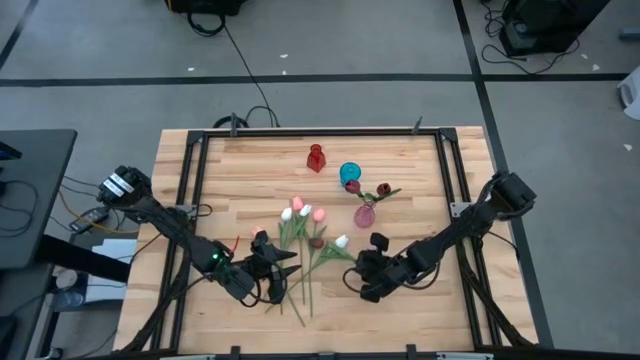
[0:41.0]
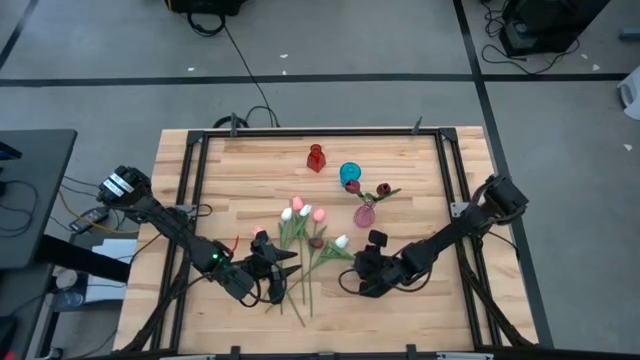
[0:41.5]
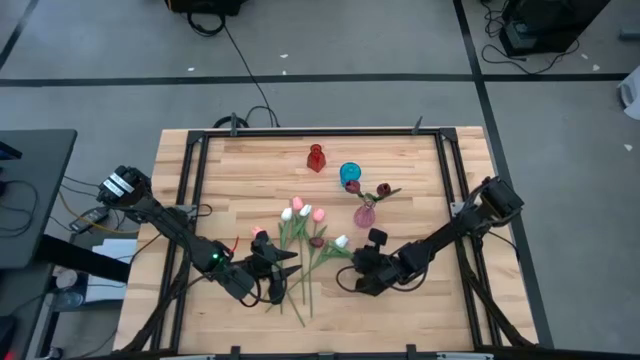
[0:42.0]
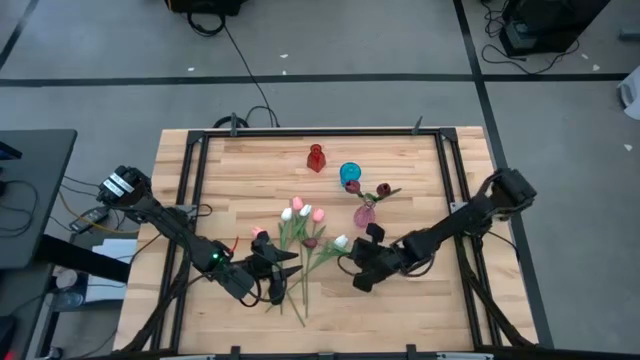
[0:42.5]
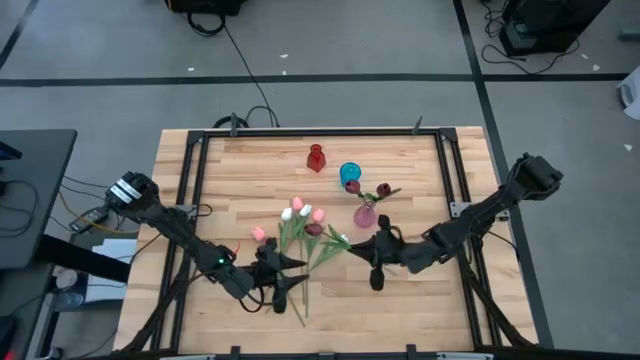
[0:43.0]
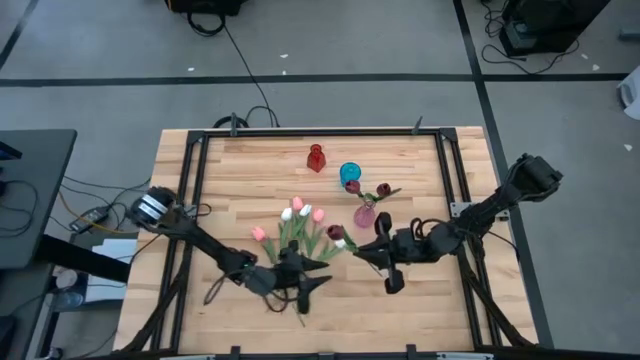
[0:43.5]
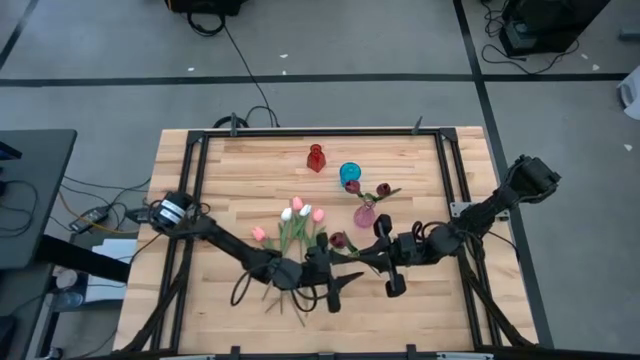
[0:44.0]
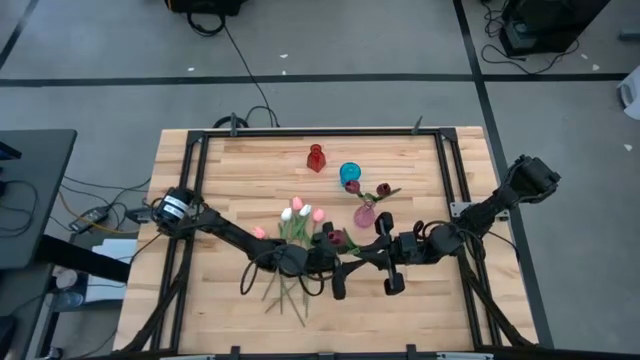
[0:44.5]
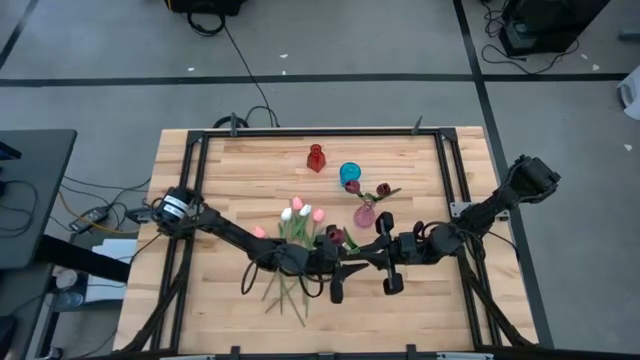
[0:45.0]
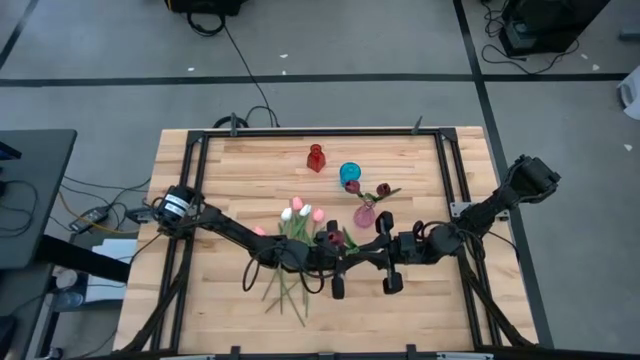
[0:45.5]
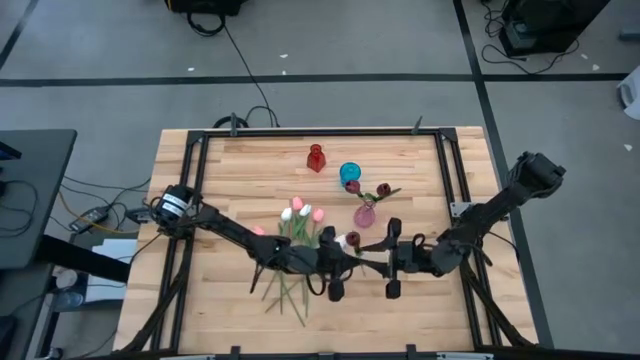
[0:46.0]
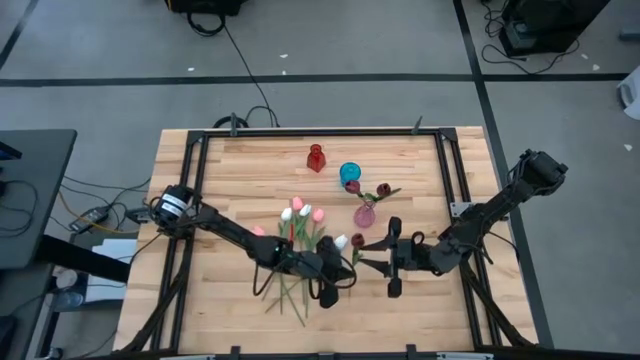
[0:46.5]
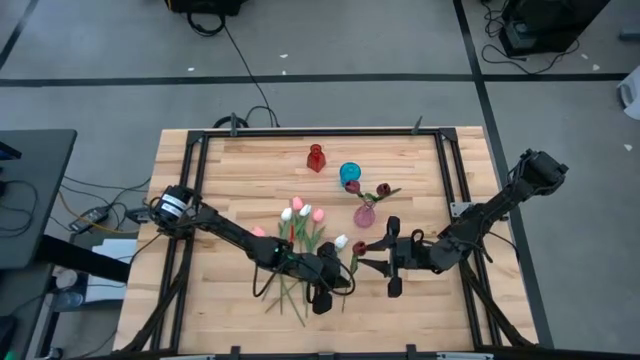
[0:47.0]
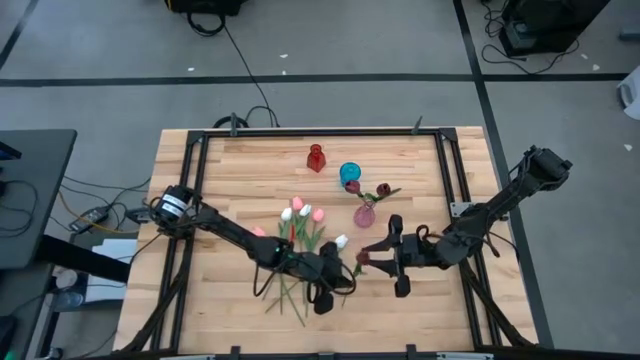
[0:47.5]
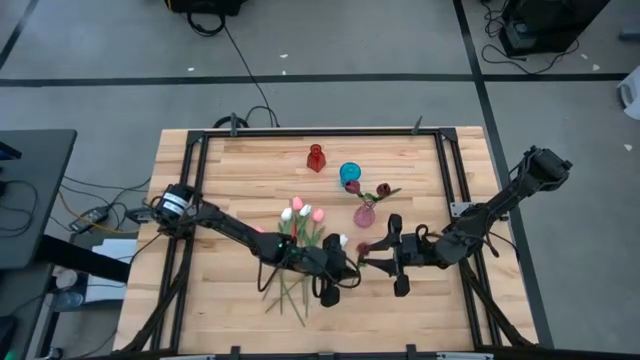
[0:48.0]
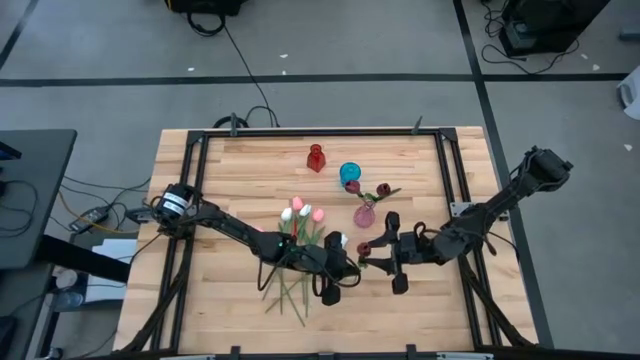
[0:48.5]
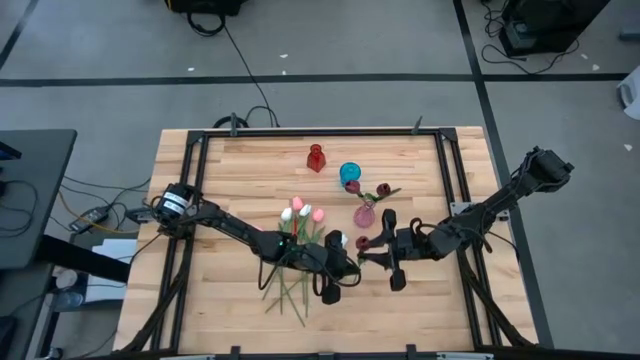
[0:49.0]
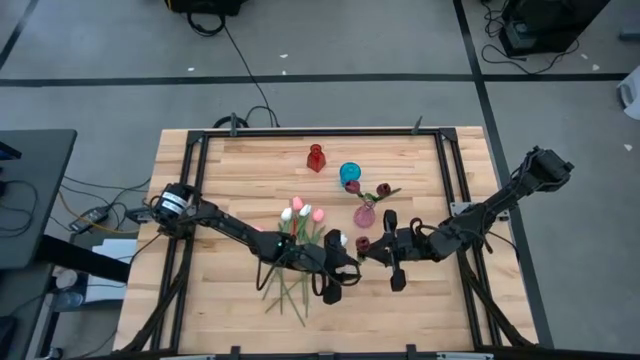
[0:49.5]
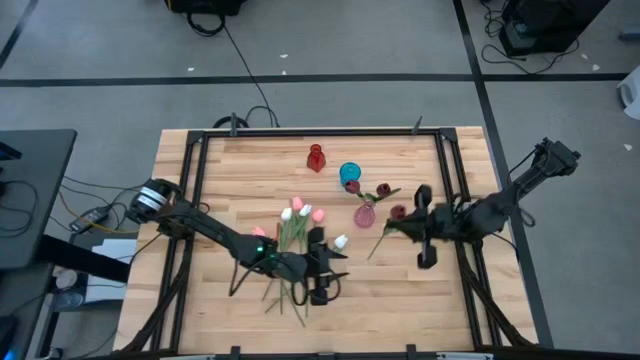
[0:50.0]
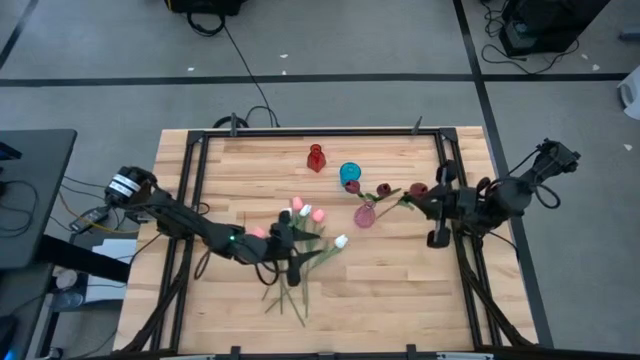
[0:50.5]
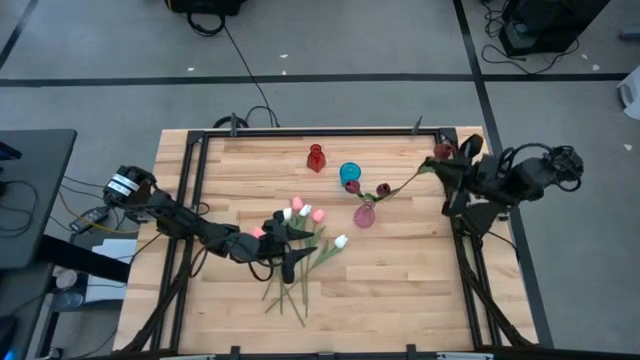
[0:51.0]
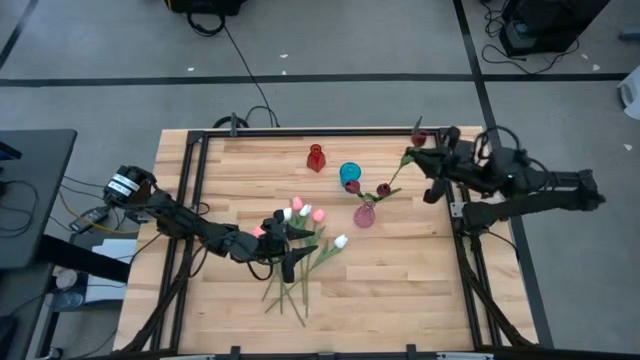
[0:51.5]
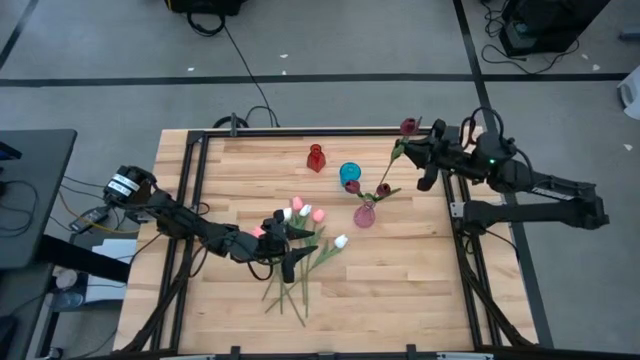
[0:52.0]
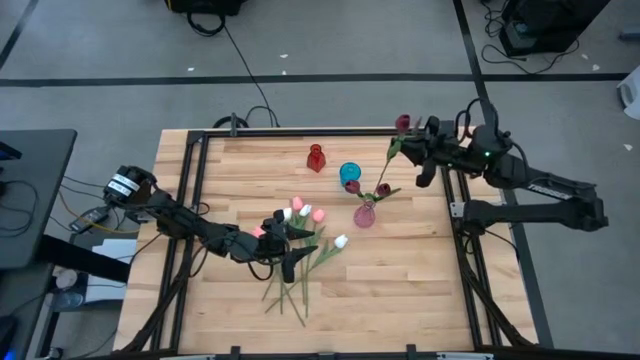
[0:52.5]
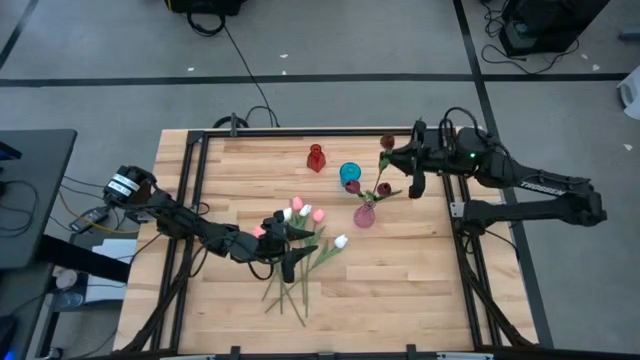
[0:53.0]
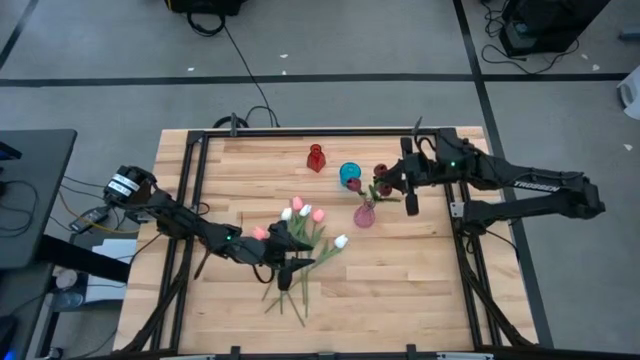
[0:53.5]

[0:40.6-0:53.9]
Task: Sort flowers into vase by color
Put the red tulip into the pink vase

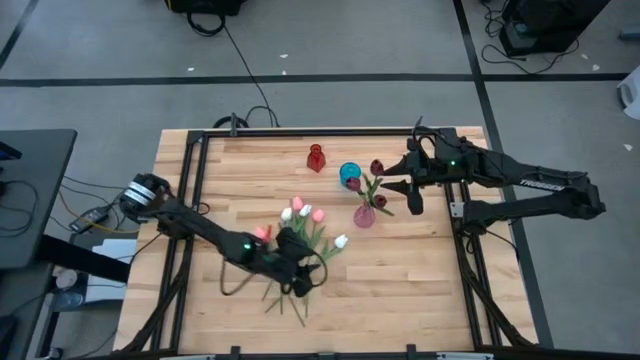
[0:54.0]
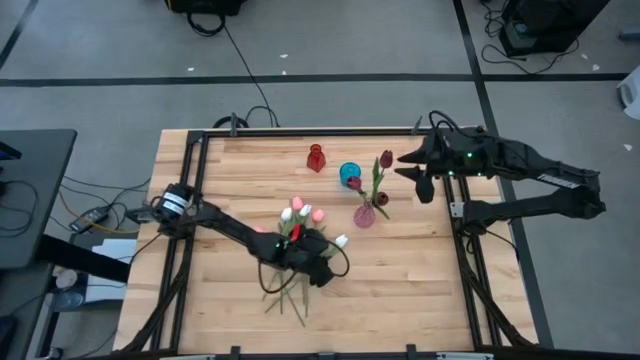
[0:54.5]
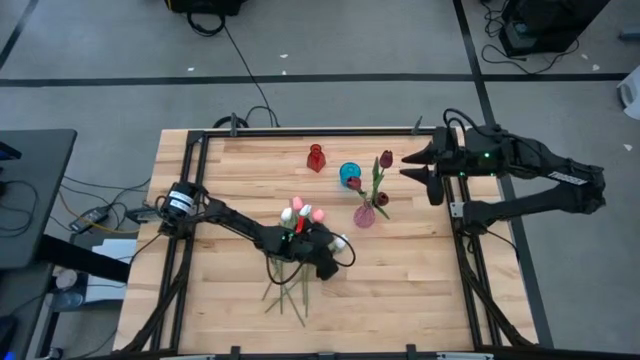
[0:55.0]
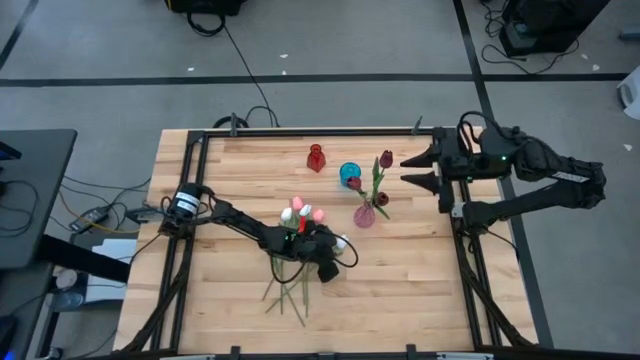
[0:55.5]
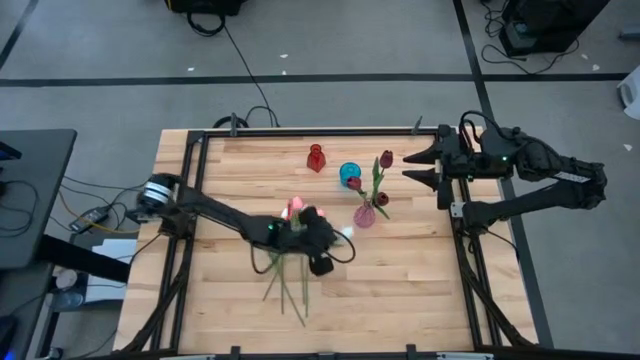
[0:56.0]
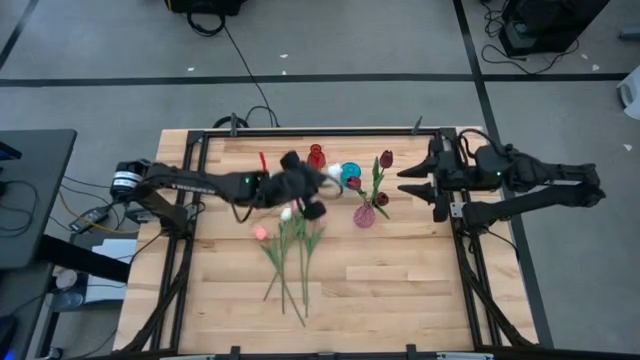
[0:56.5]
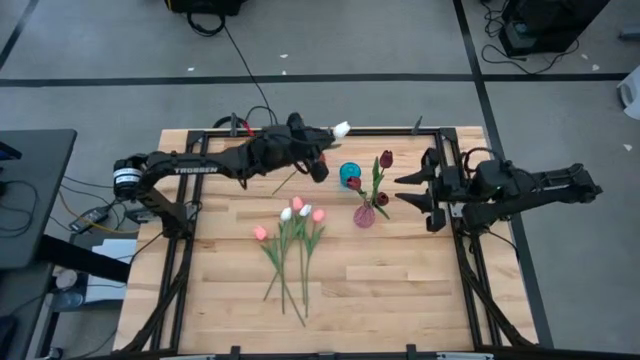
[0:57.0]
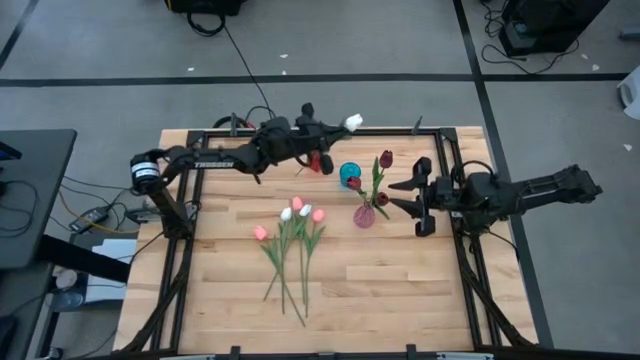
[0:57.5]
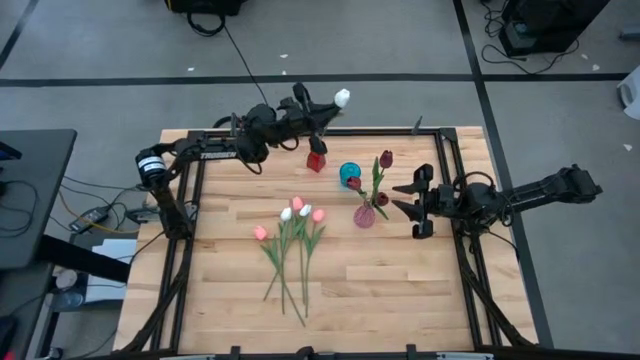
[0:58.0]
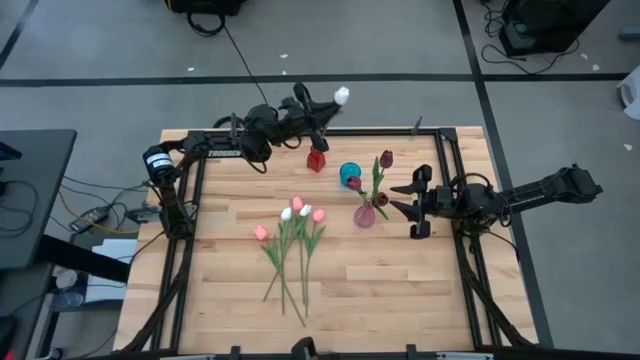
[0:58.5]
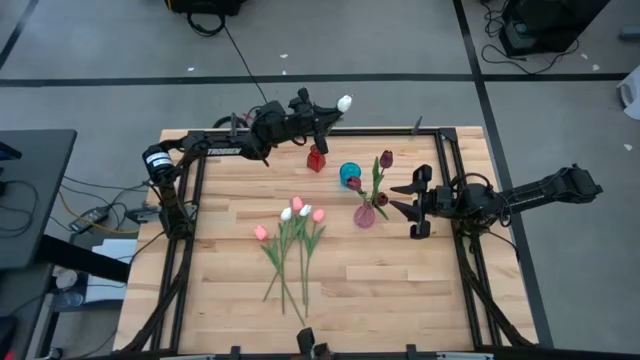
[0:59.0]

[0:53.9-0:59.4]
Put the right white tulip into the red vase

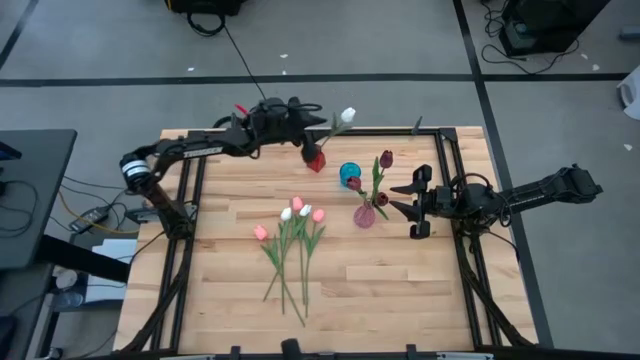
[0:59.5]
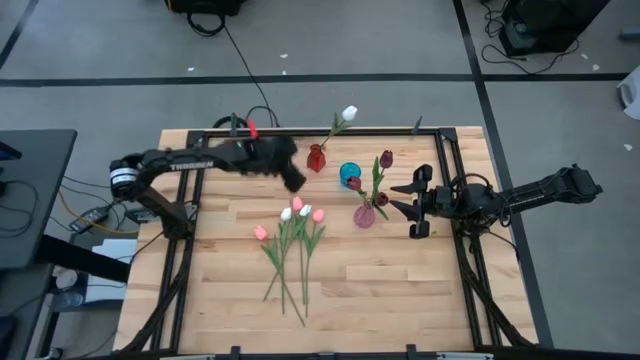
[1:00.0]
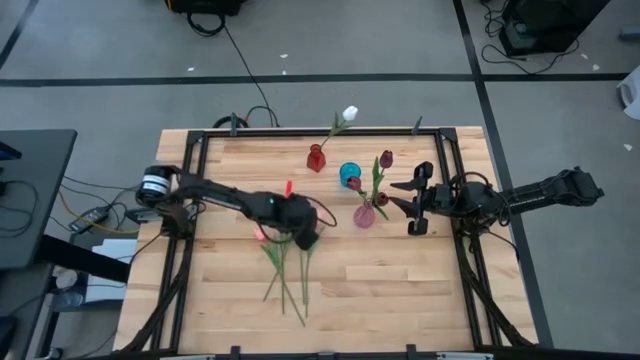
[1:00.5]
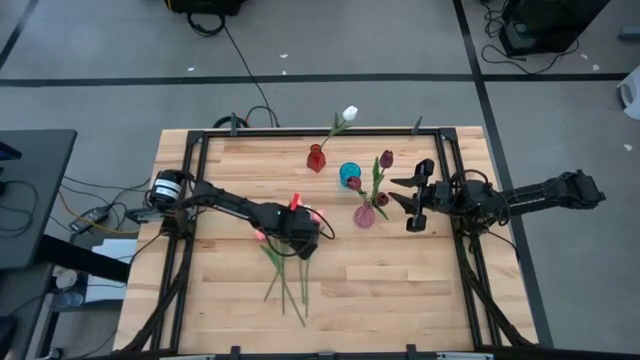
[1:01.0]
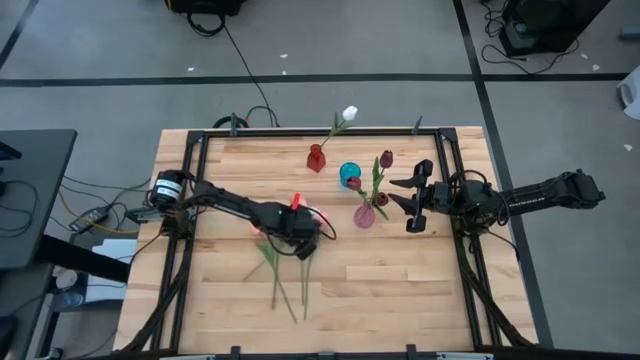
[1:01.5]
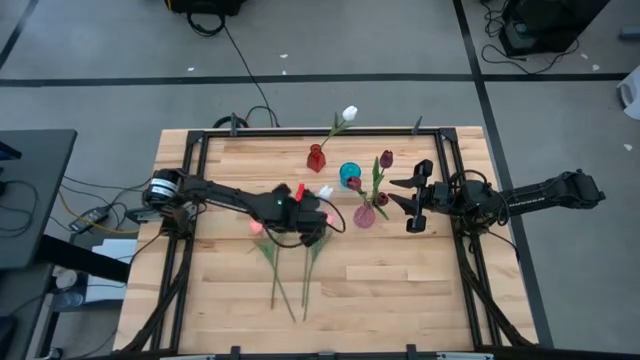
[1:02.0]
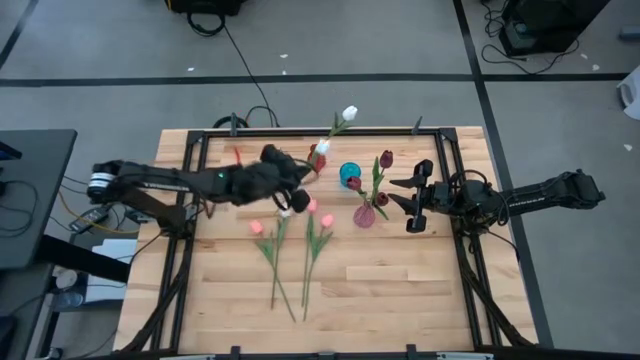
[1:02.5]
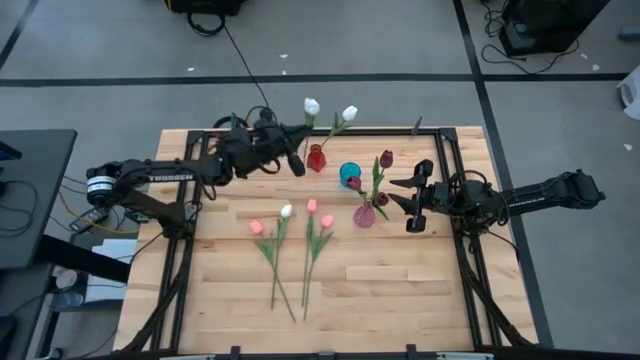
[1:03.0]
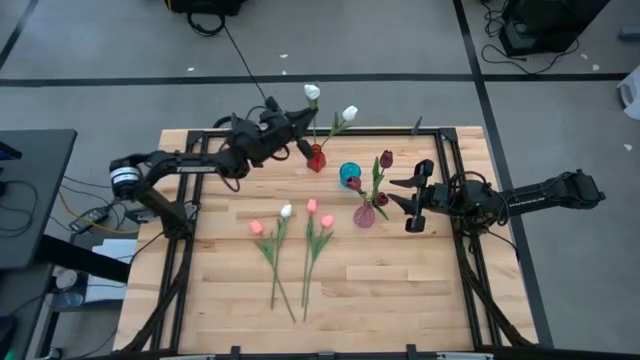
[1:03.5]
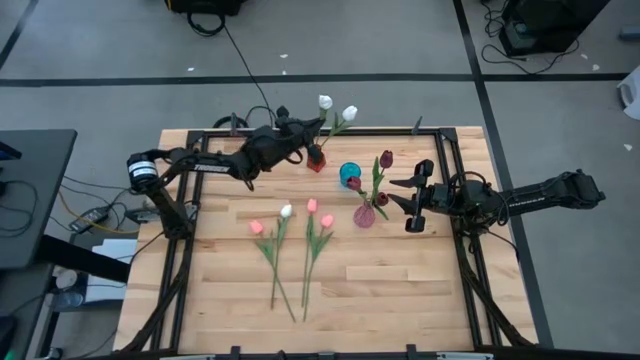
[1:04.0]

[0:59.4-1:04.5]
Put the right white tulip into the red vase
